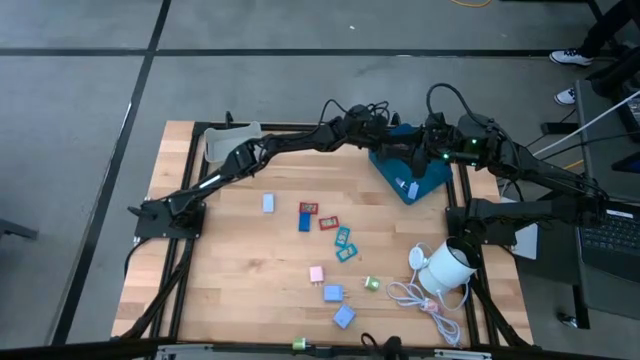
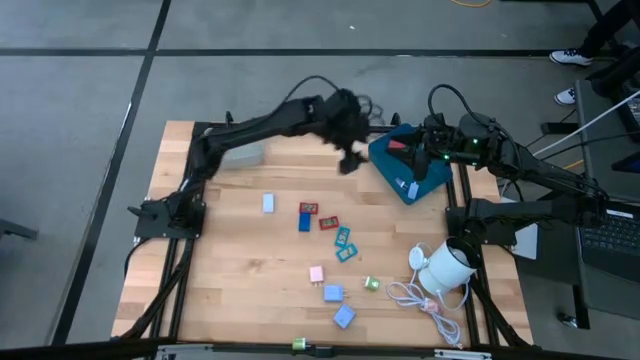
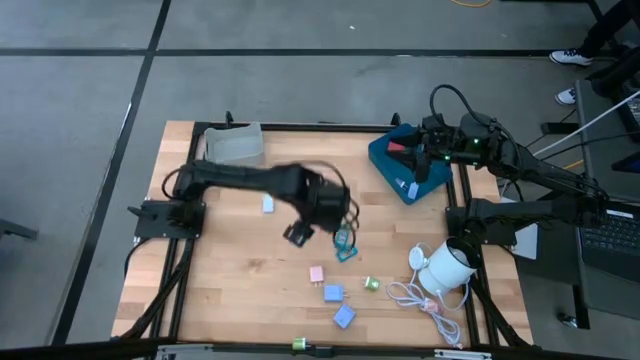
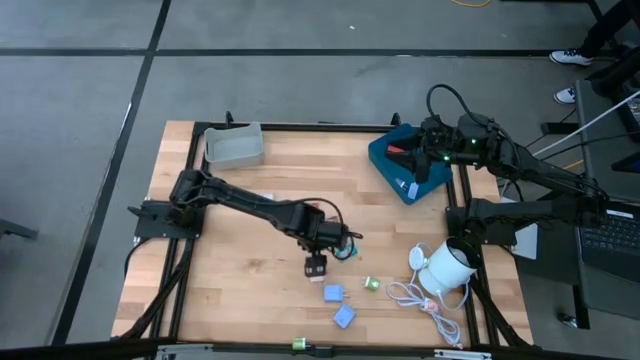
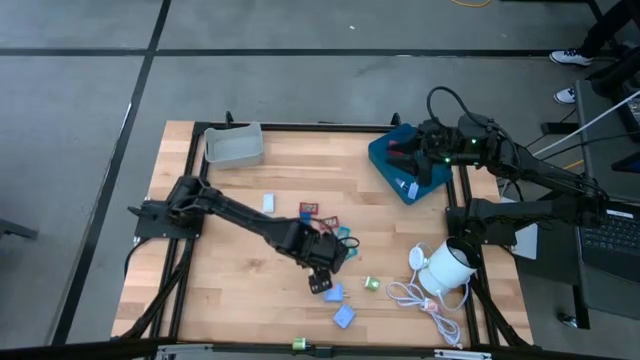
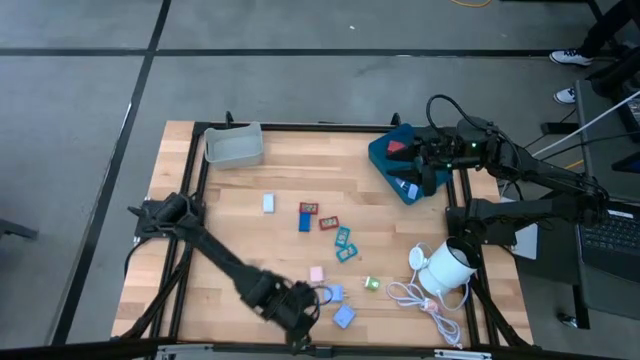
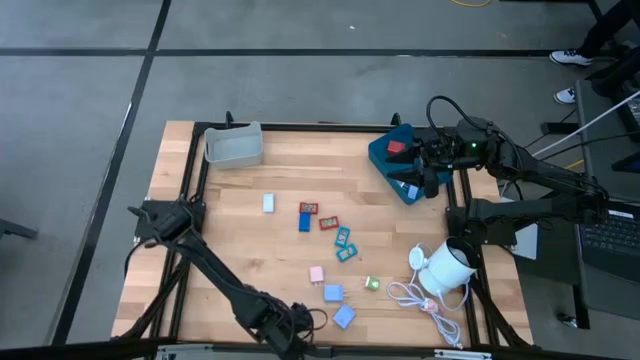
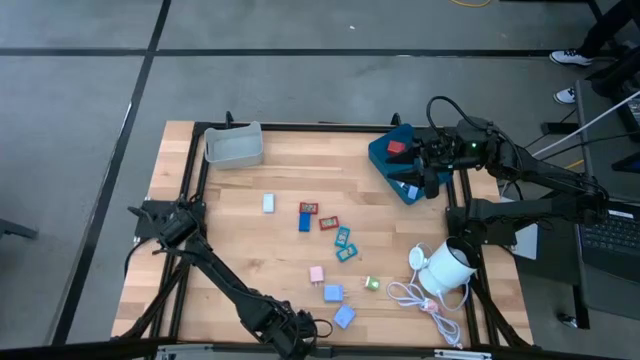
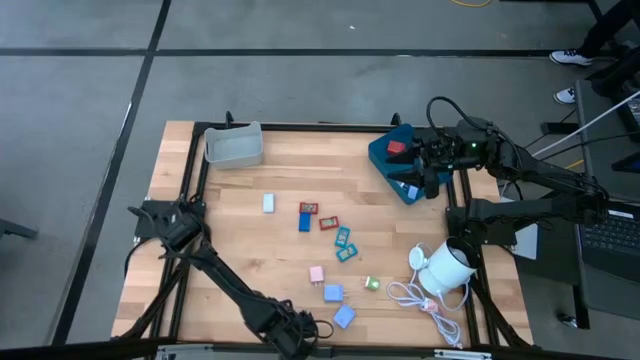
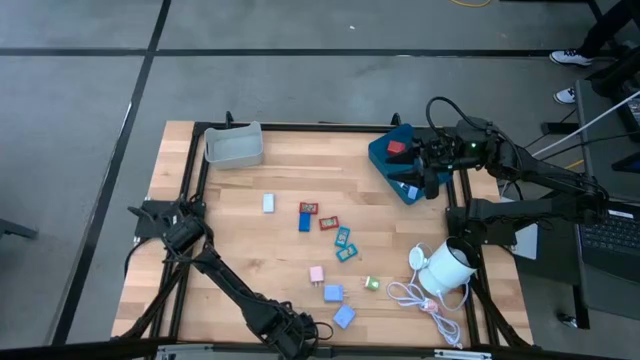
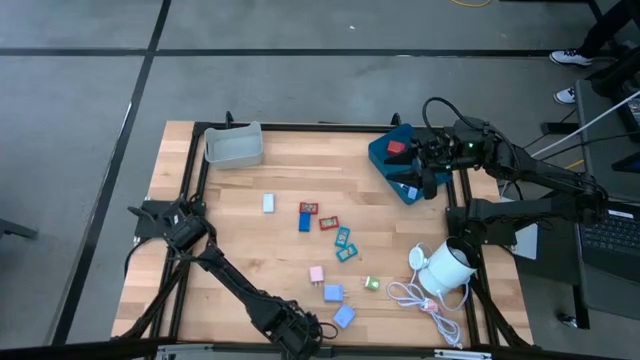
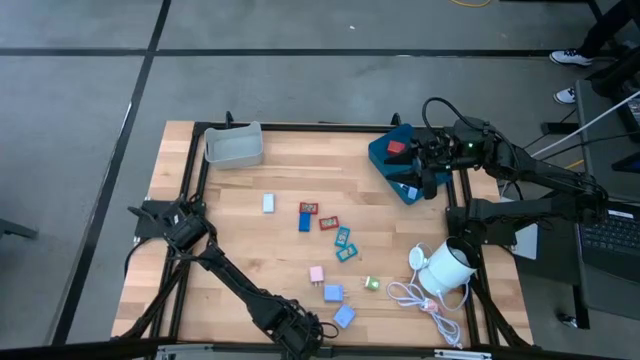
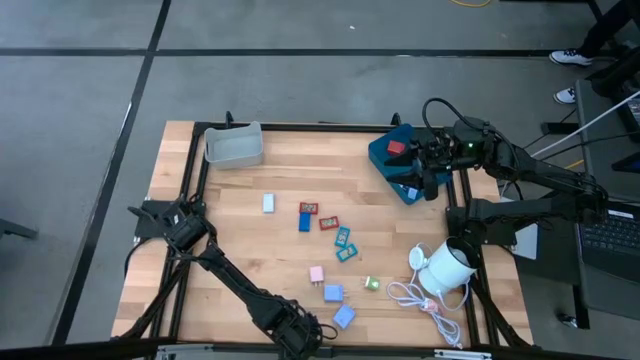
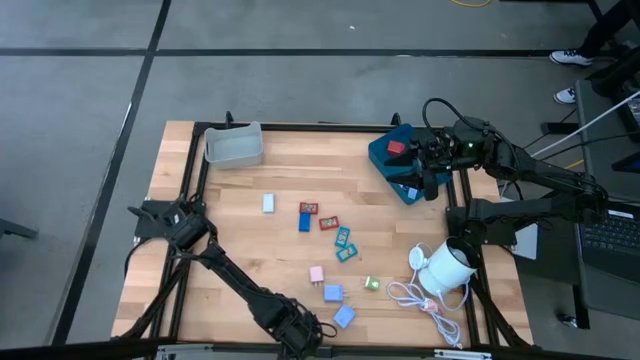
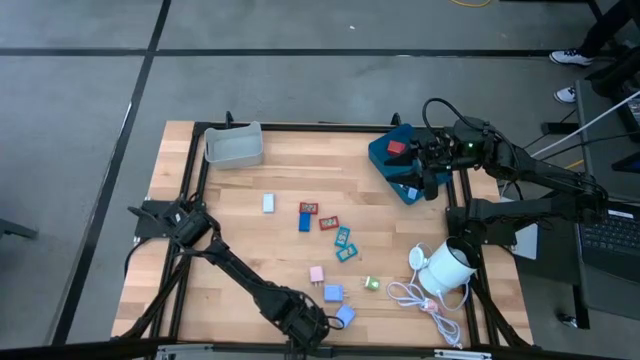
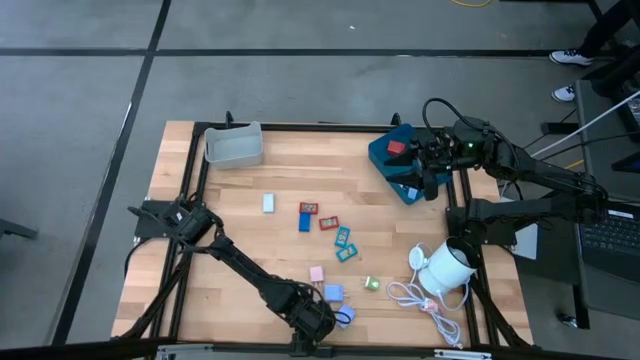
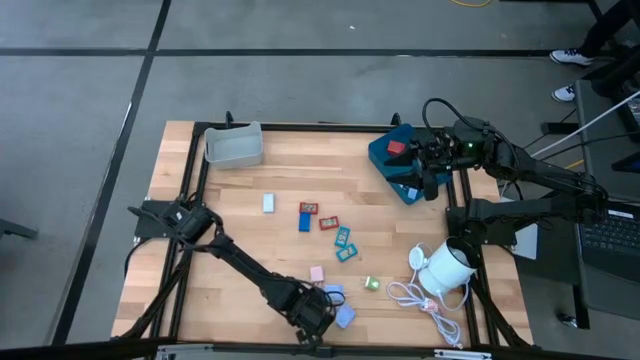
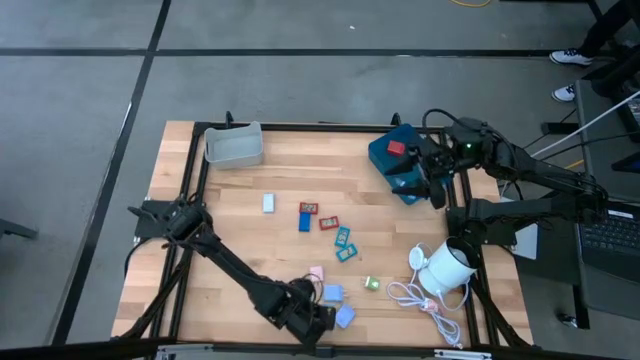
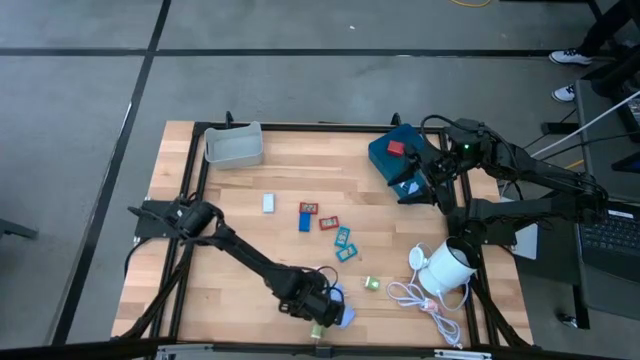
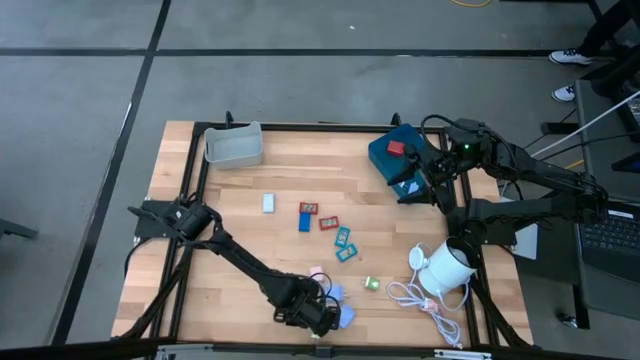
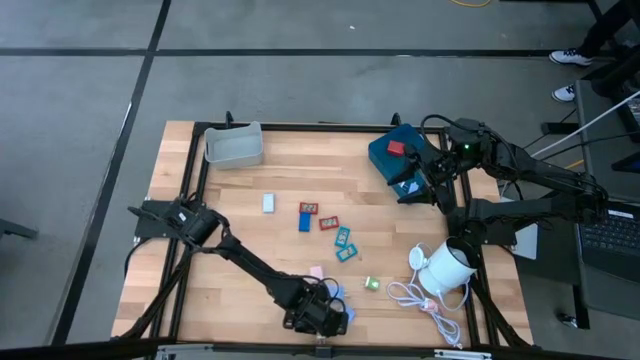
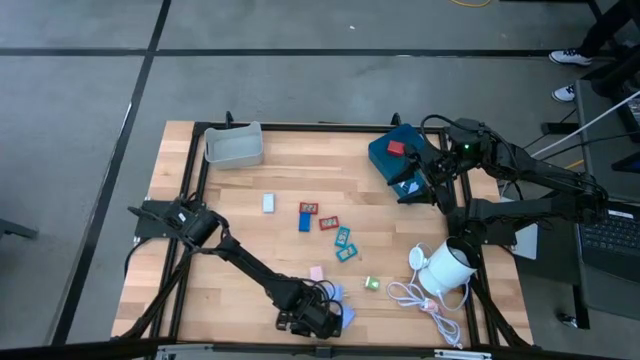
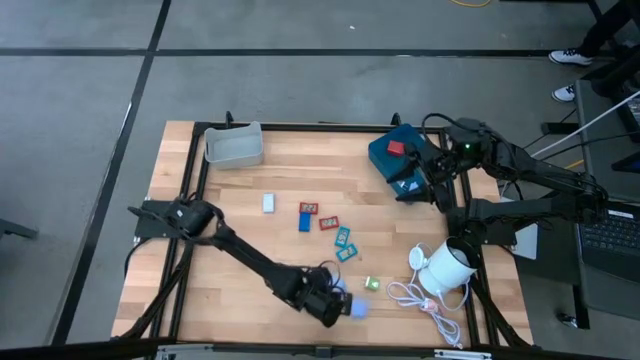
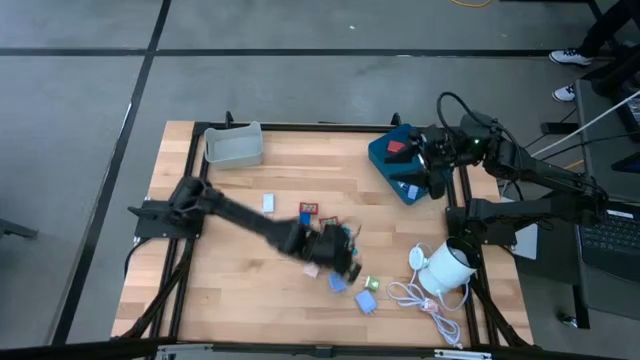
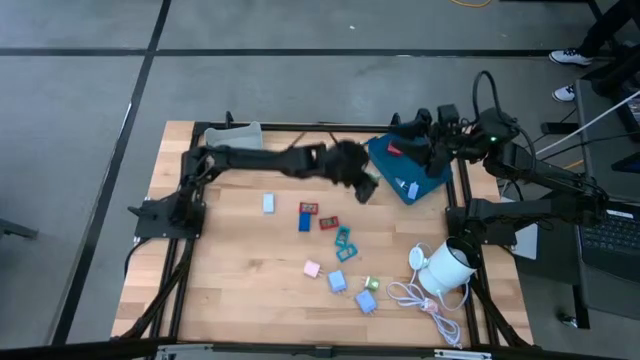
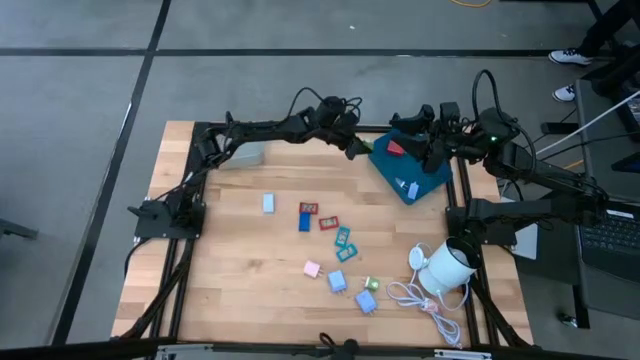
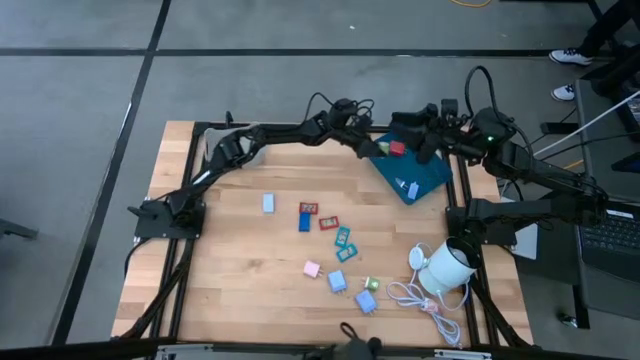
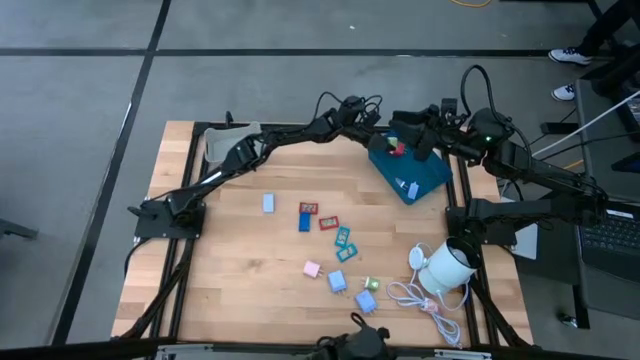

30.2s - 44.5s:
Task: Pick & Place Office items
Put the bottom green charger adapter into the blue bin

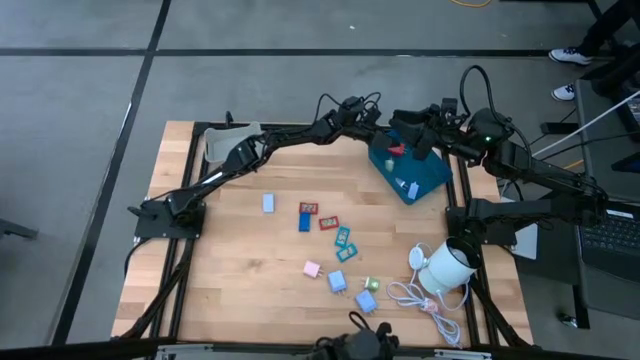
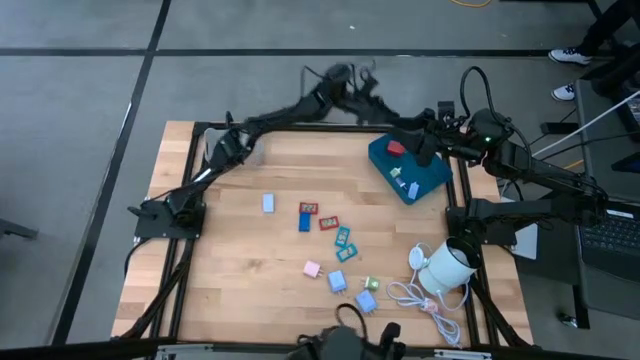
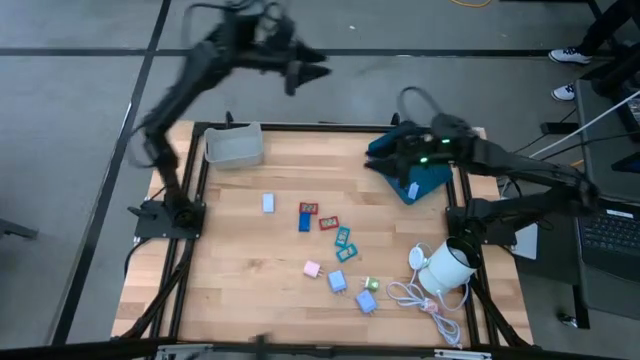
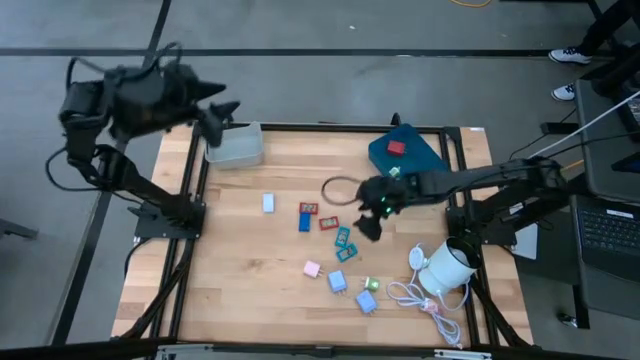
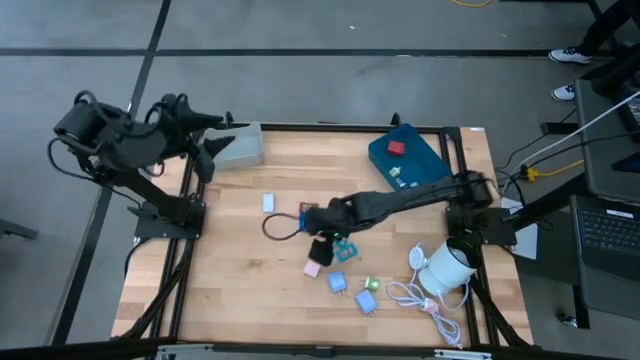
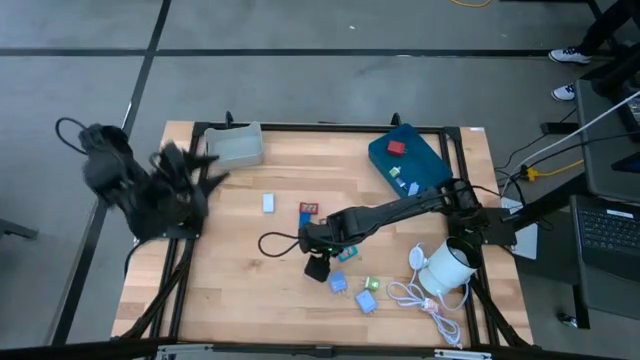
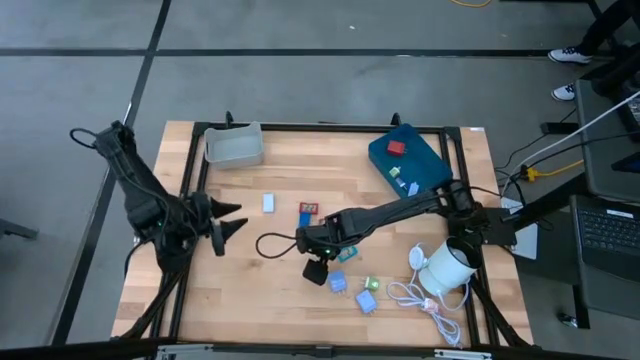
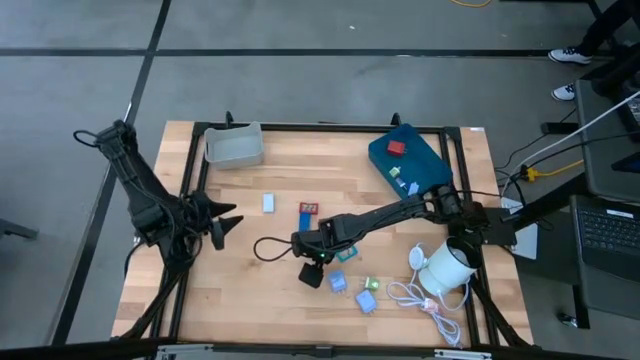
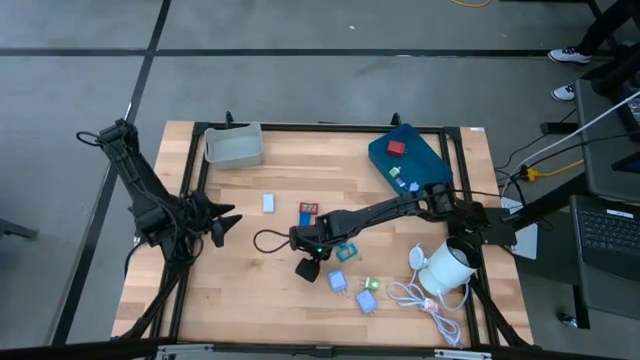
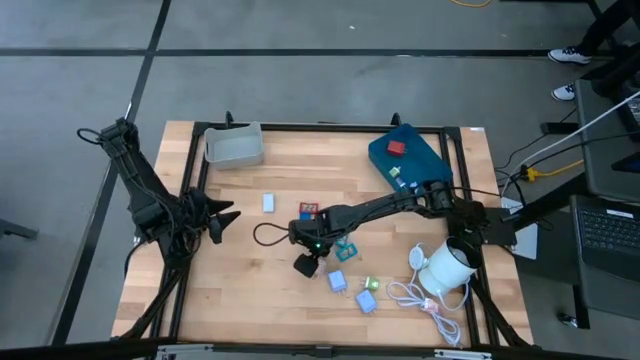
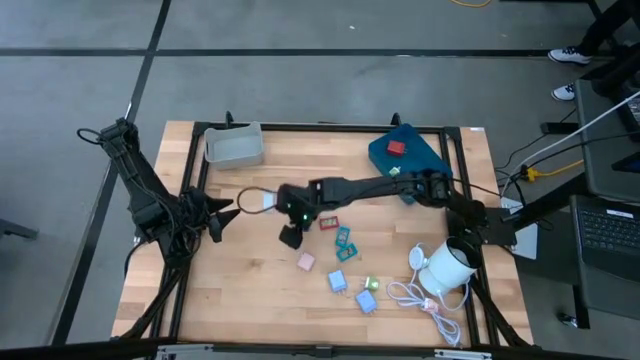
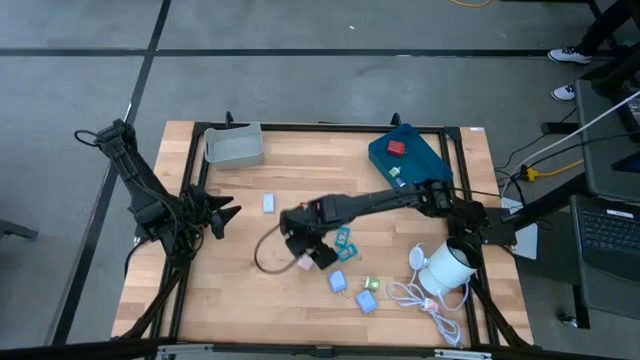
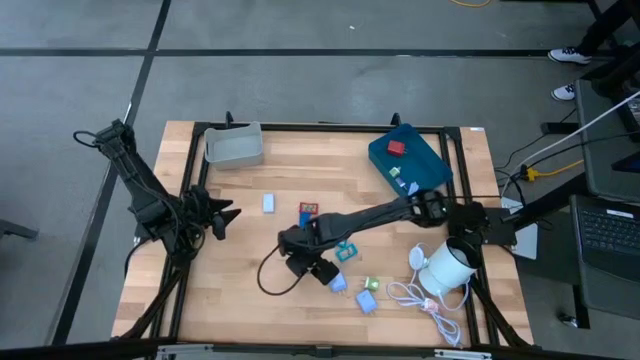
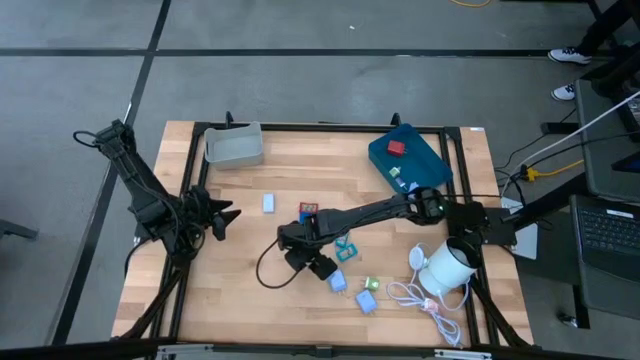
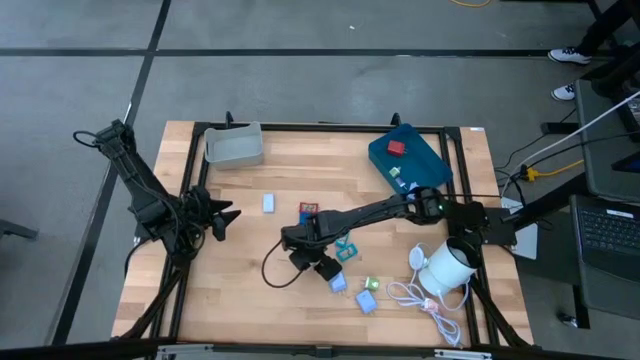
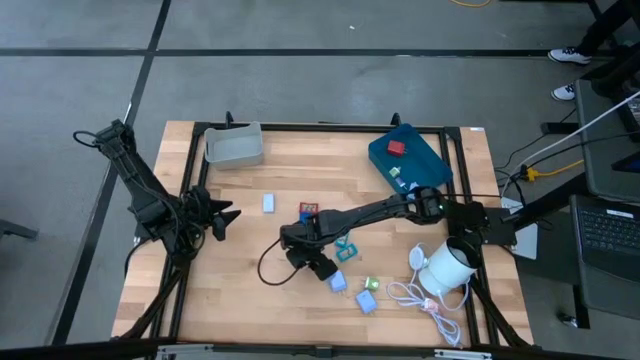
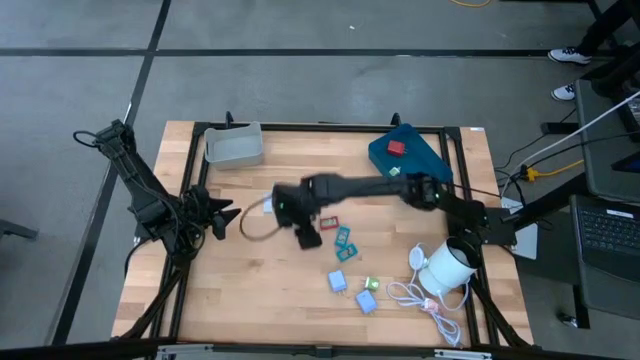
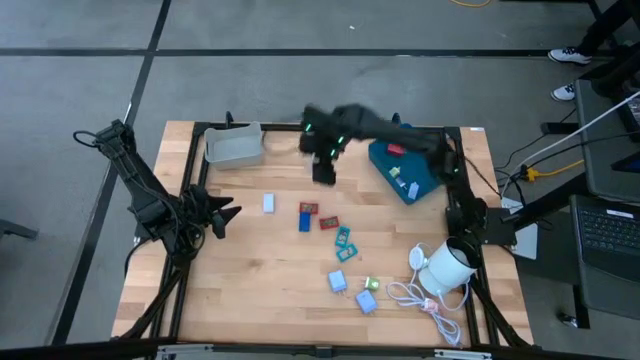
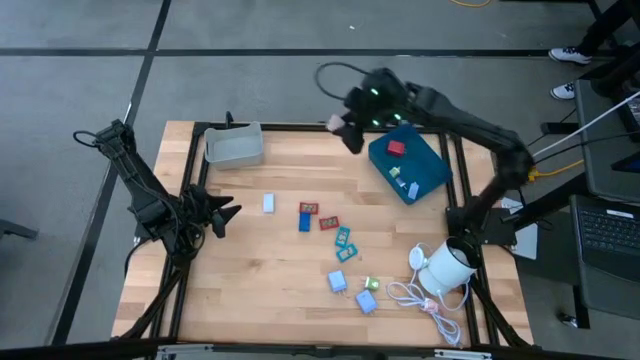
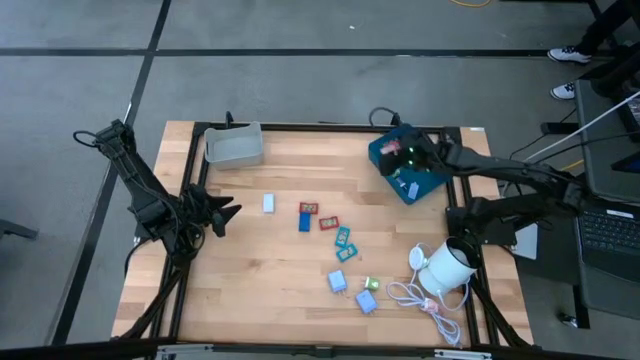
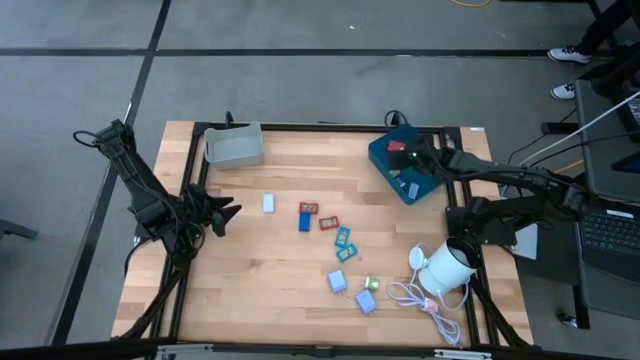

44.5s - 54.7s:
Put the pink charger adapter into the blue bin
